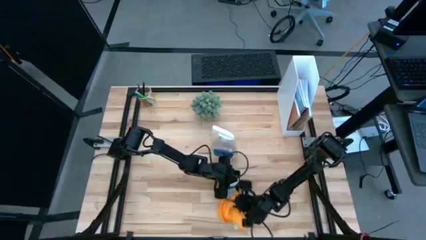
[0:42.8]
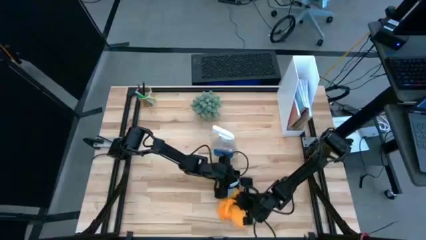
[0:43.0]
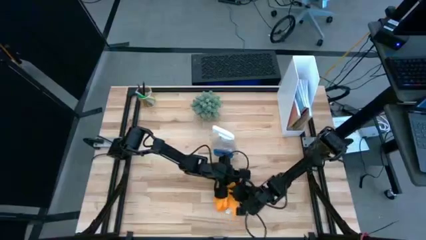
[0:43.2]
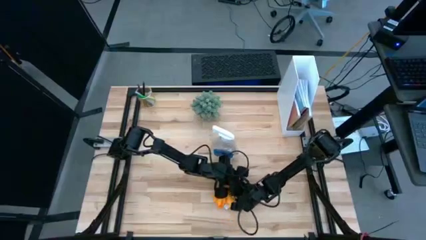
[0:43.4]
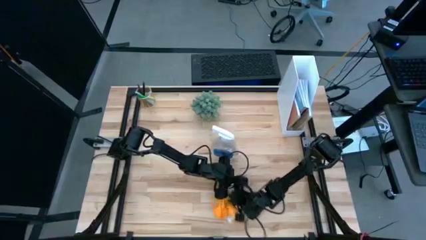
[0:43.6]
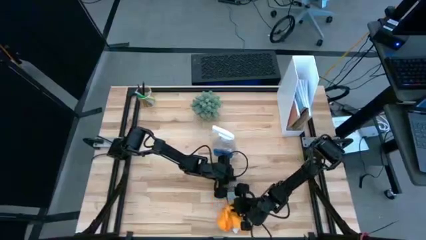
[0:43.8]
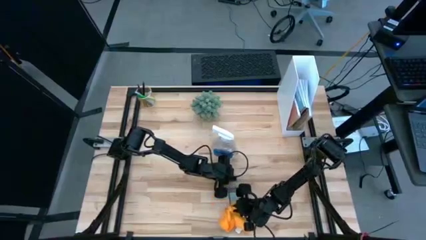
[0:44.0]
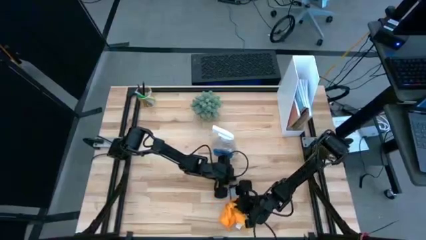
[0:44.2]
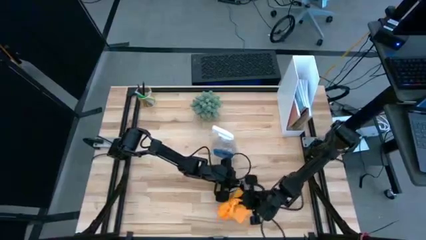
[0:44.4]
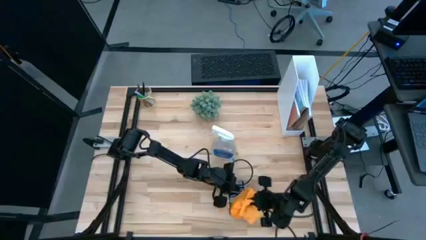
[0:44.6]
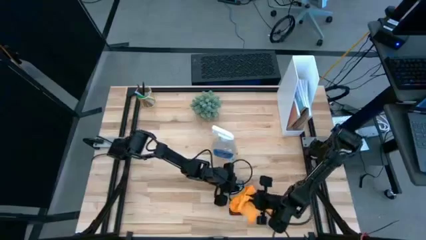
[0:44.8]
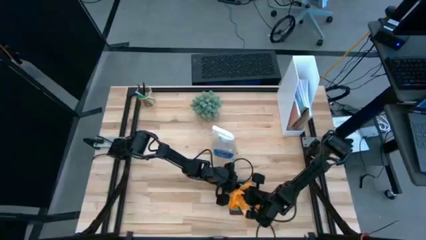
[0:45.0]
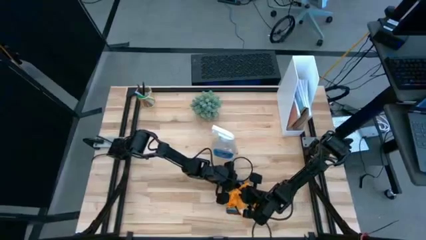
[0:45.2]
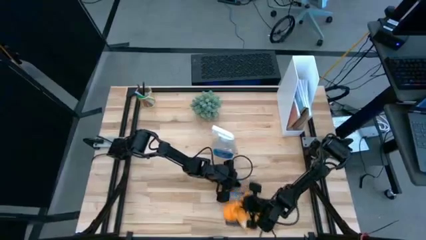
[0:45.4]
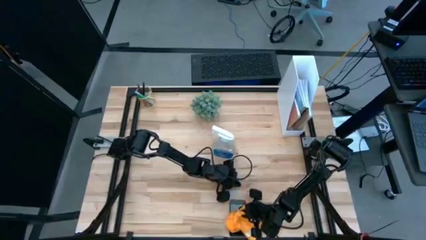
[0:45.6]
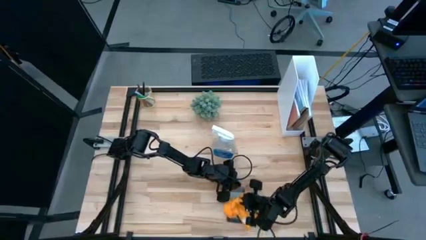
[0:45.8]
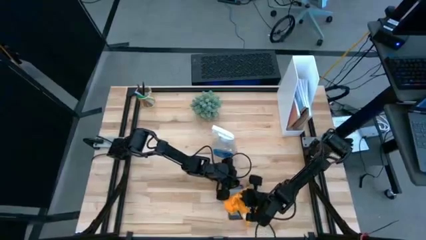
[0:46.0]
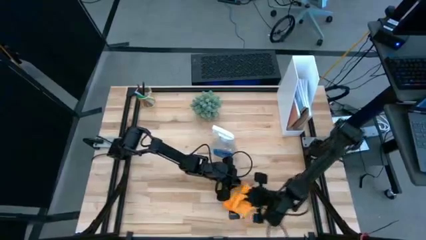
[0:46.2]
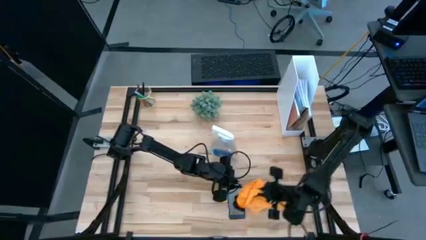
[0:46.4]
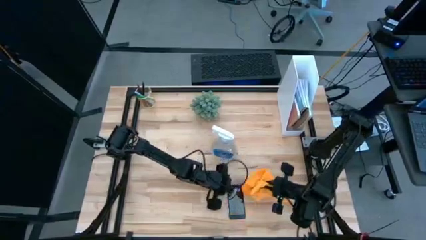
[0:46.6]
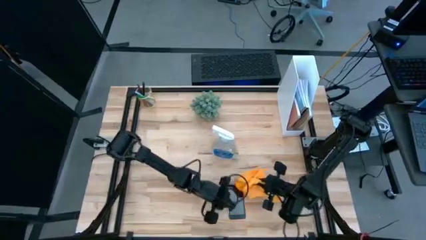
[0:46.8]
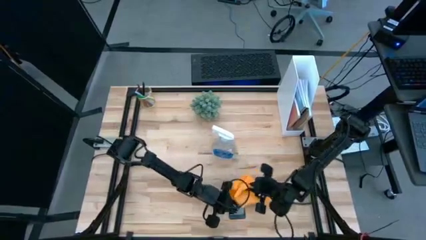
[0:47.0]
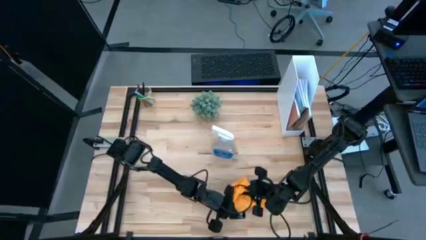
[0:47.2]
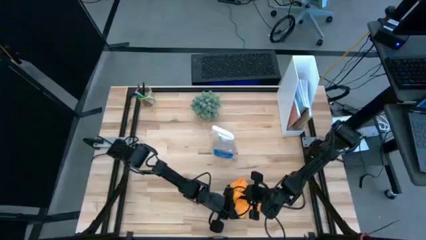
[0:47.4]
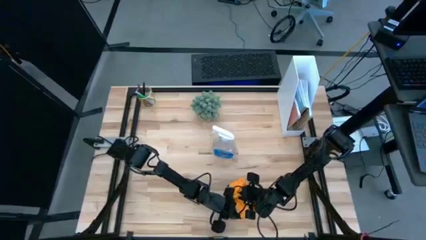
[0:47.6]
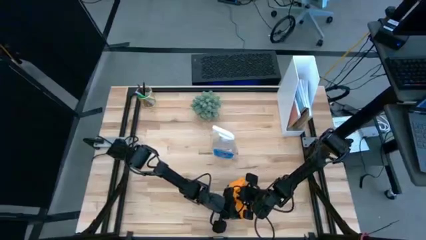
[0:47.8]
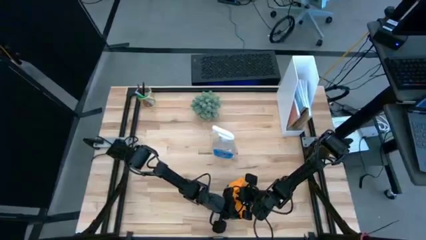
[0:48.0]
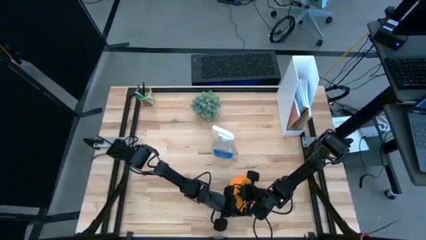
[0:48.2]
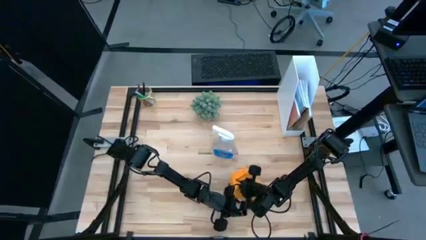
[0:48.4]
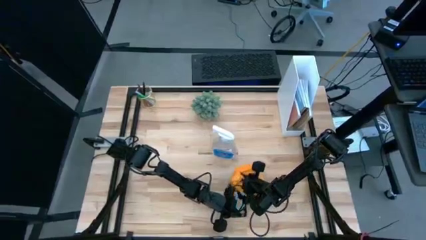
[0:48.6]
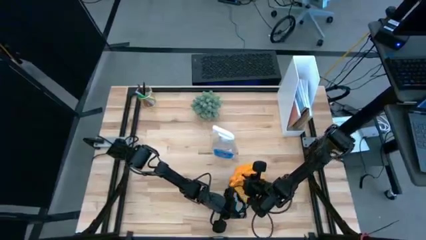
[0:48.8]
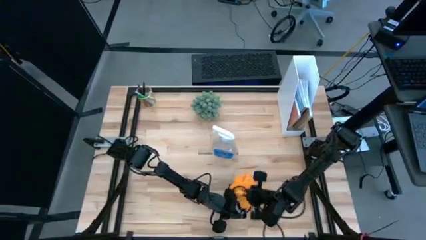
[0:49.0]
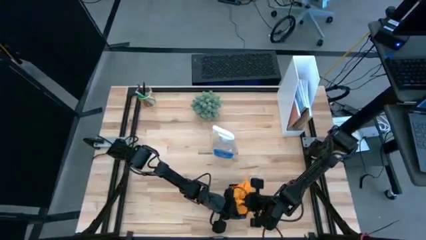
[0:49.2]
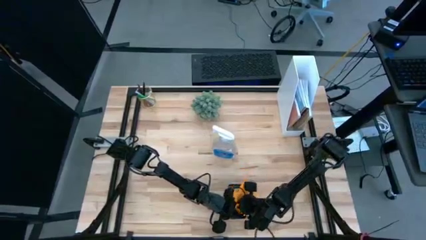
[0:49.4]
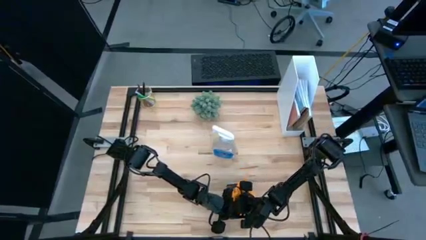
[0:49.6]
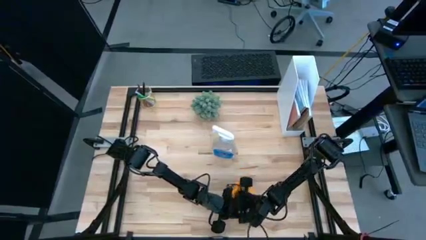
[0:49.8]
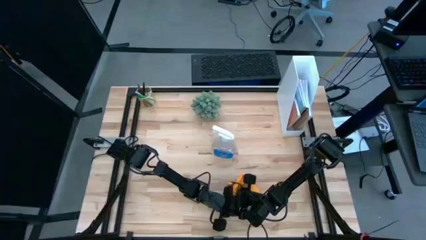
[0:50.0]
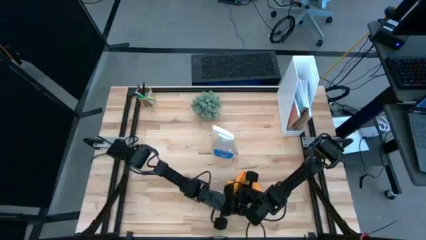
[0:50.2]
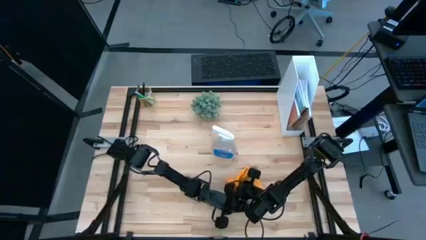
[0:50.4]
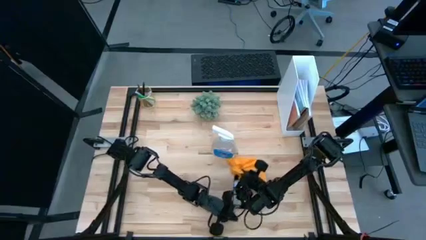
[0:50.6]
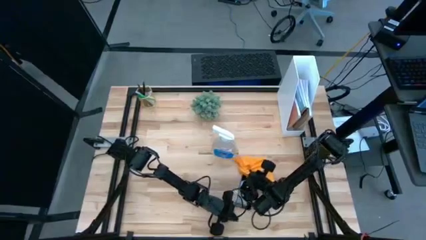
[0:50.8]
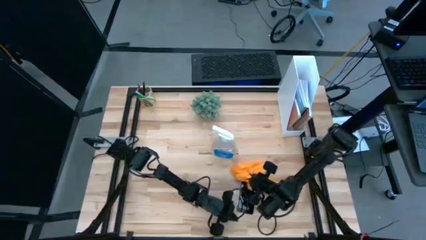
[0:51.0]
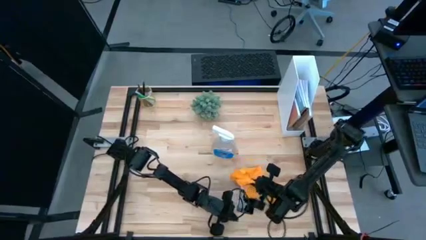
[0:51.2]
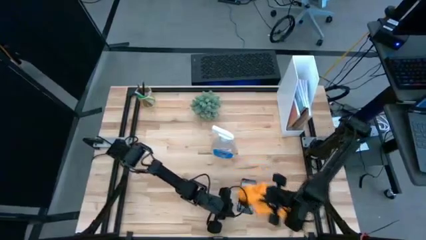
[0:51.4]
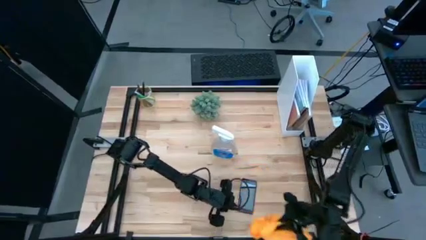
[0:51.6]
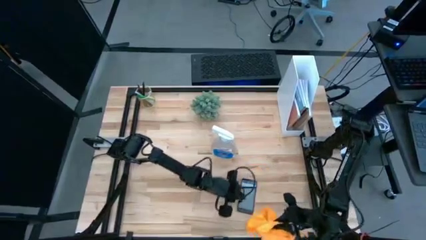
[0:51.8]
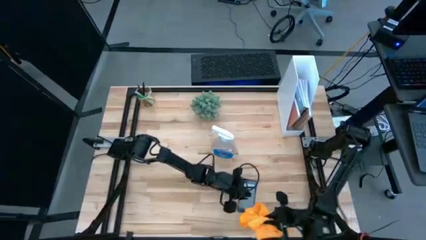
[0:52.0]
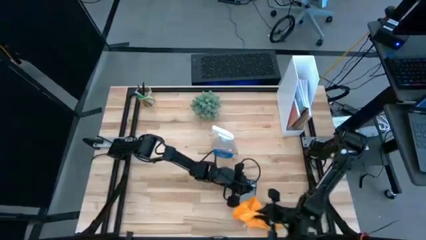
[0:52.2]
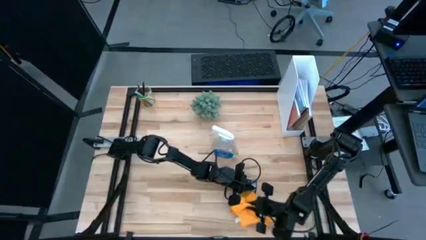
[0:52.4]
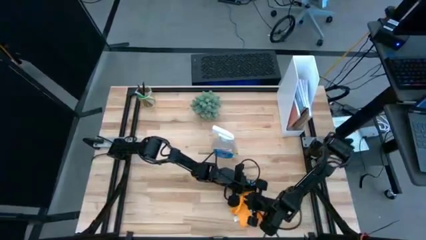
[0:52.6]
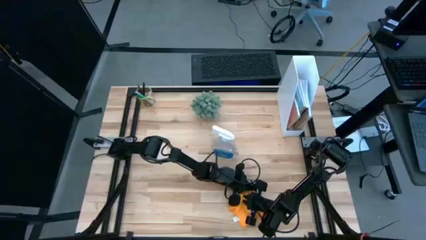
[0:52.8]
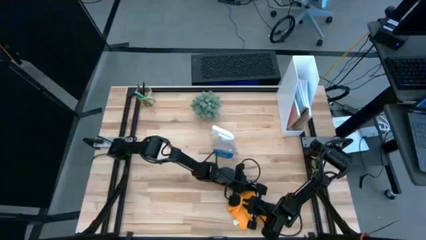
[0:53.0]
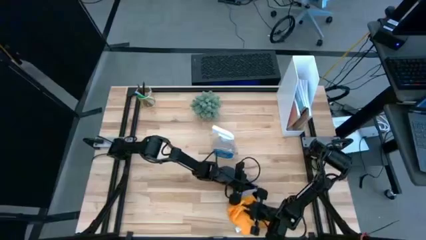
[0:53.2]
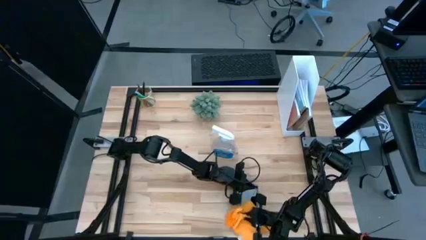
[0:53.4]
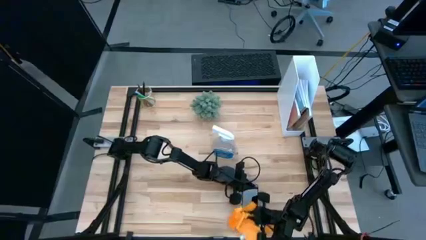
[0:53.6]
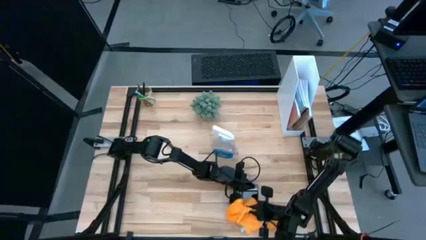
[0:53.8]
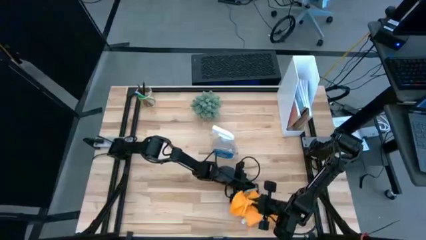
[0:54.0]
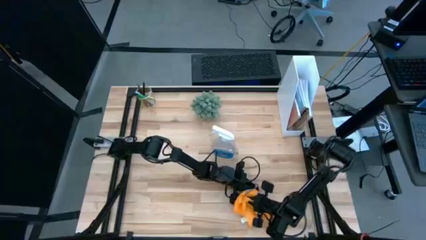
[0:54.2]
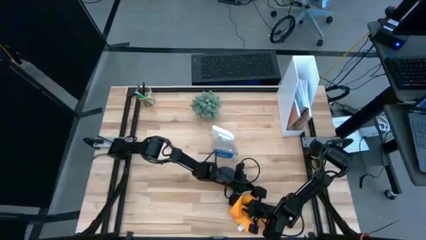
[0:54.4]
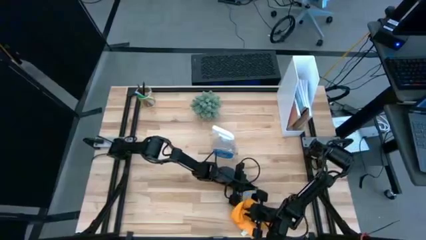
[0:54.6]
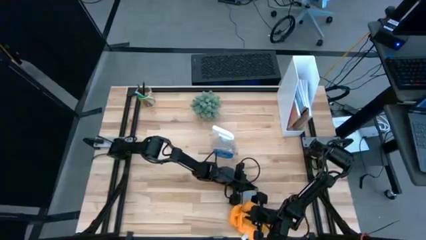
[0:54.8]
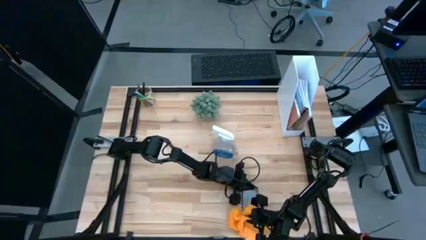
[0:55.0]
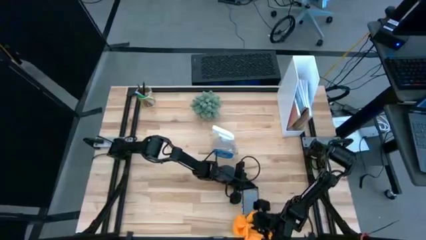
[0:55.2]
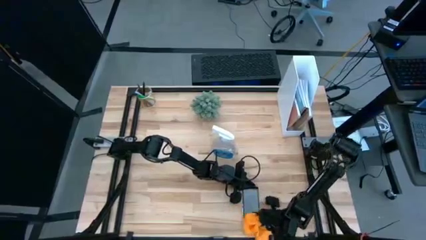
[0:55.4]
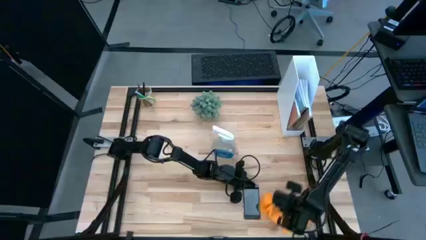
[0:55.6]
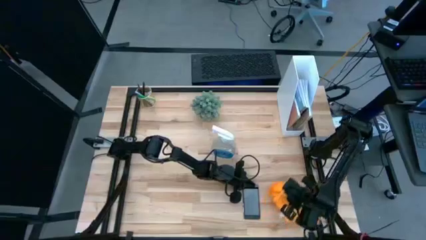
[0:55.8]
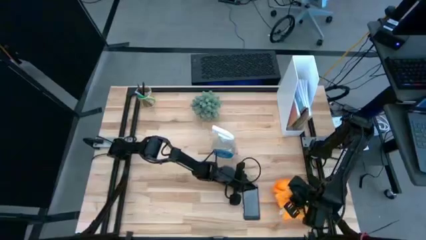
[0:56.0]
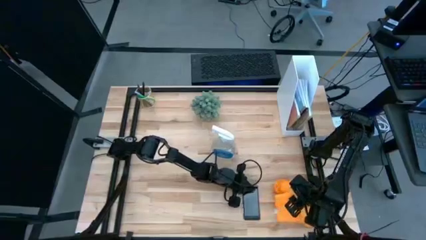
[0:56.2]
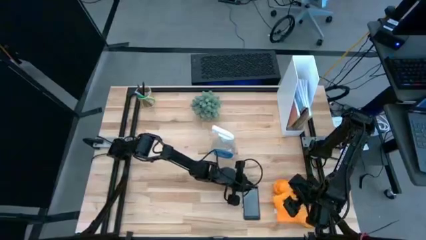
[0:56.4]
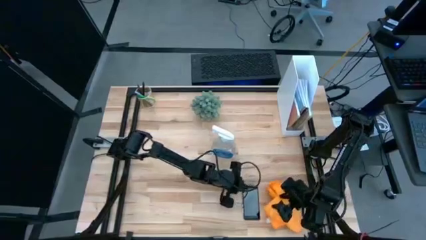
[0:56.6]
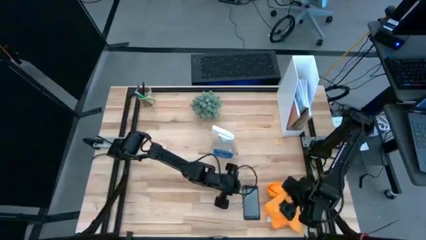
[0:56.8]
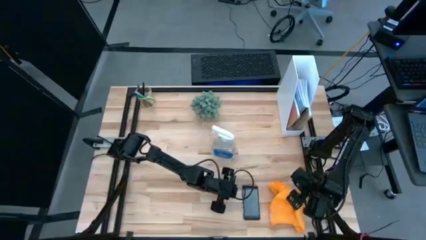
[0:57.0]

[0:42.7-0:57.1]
Task: Apply microfiber cloth
Wipe the front of the cellphone with the yellow microfiber cloth
